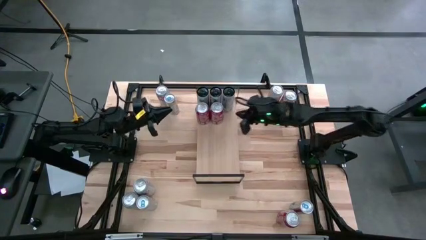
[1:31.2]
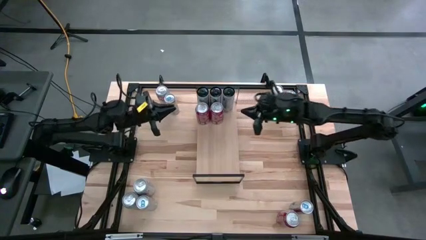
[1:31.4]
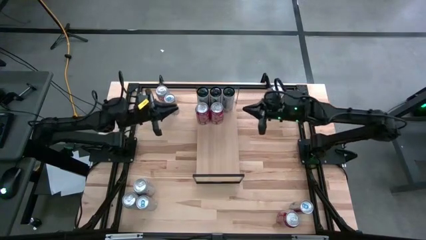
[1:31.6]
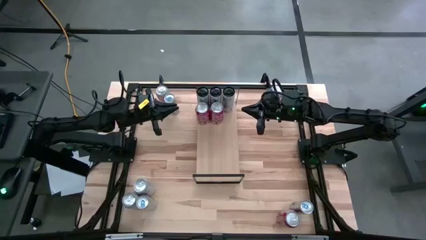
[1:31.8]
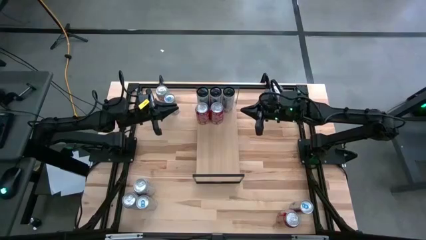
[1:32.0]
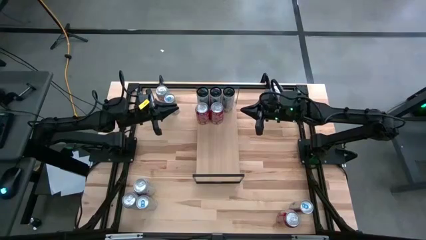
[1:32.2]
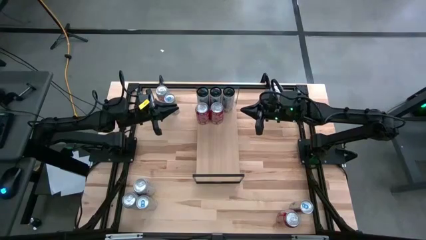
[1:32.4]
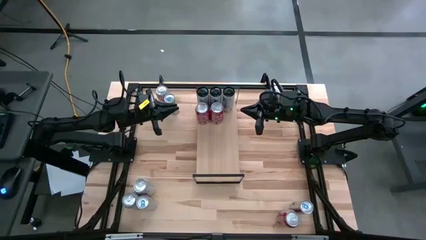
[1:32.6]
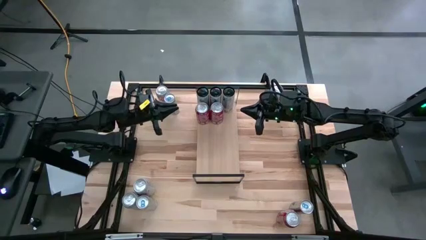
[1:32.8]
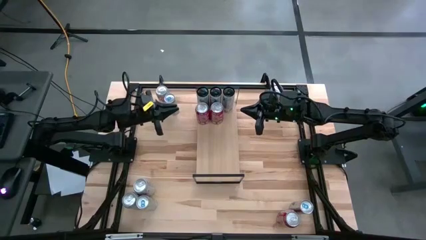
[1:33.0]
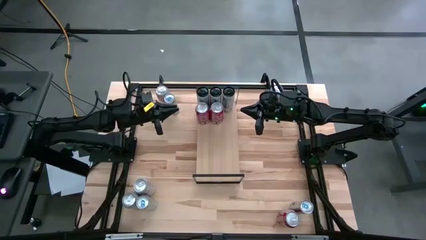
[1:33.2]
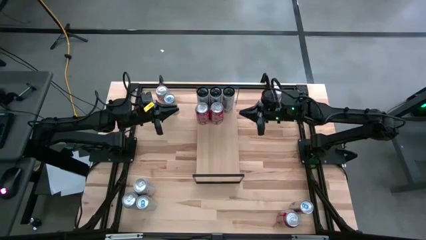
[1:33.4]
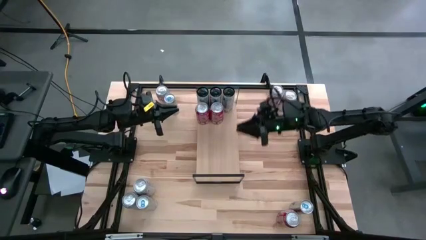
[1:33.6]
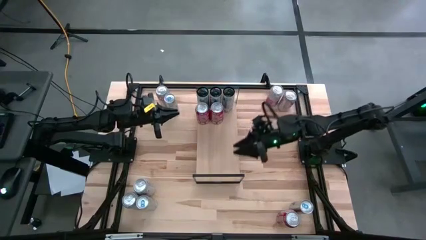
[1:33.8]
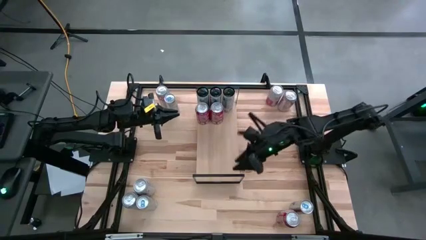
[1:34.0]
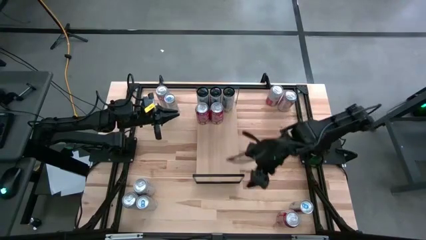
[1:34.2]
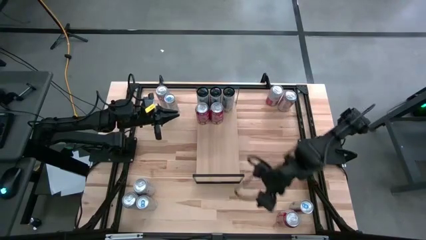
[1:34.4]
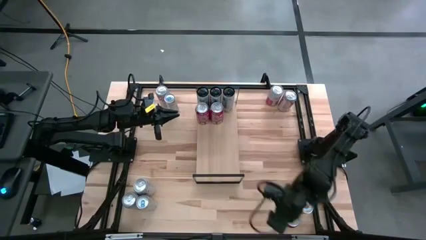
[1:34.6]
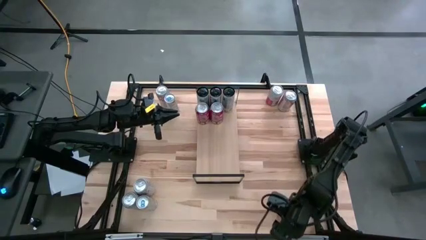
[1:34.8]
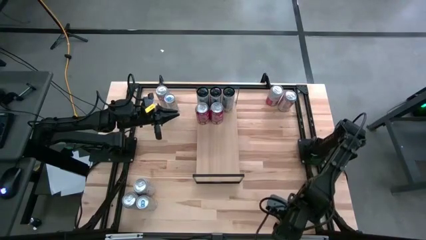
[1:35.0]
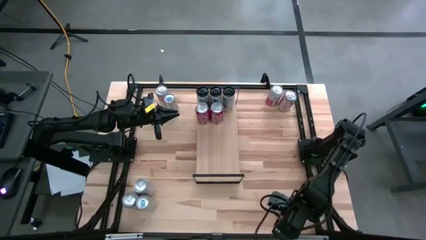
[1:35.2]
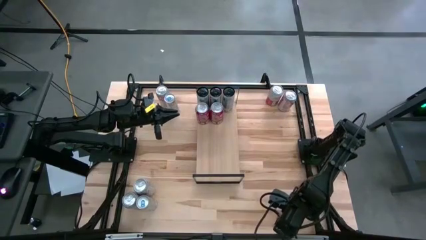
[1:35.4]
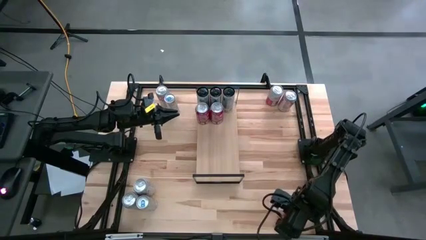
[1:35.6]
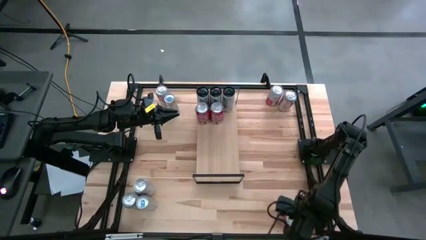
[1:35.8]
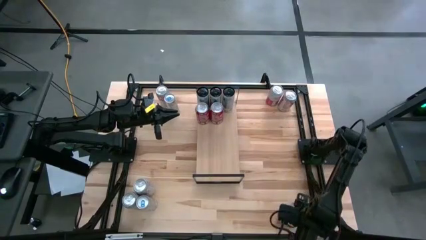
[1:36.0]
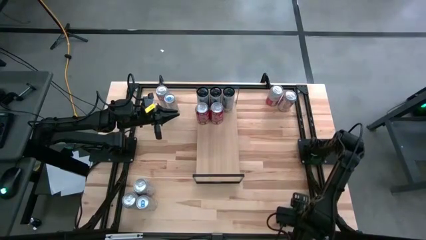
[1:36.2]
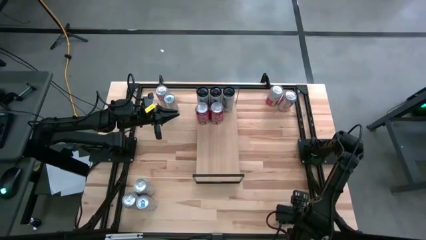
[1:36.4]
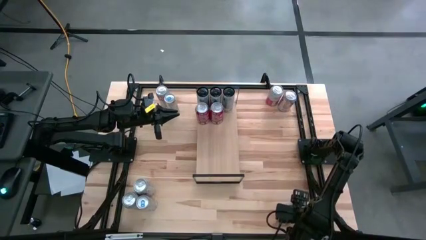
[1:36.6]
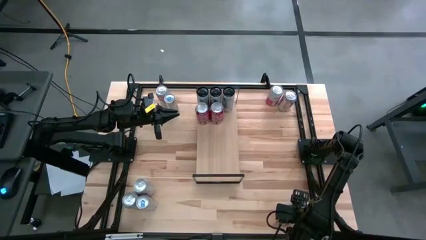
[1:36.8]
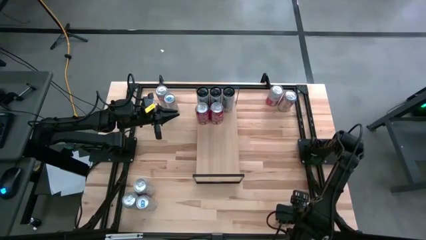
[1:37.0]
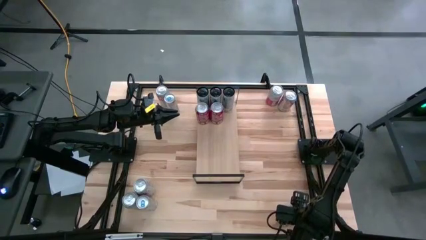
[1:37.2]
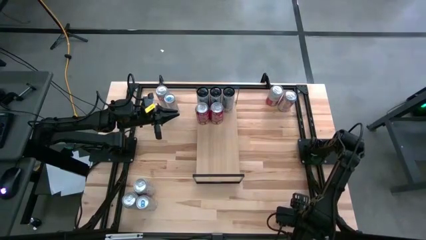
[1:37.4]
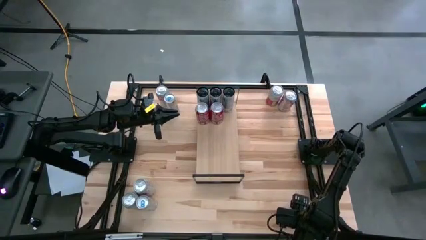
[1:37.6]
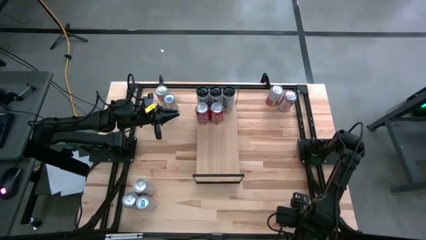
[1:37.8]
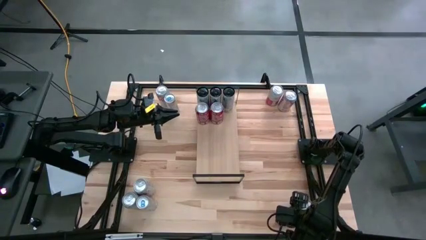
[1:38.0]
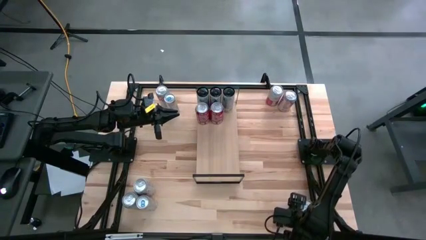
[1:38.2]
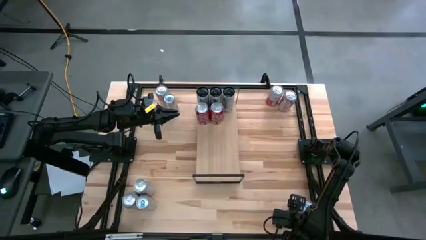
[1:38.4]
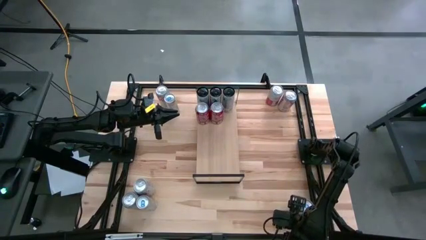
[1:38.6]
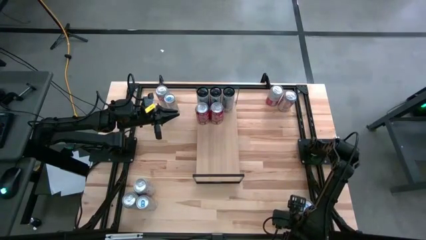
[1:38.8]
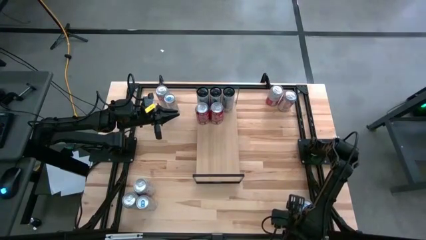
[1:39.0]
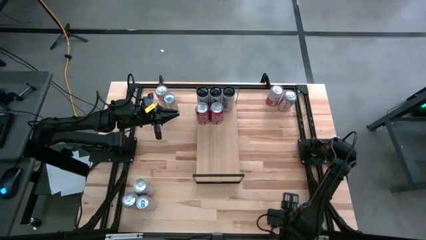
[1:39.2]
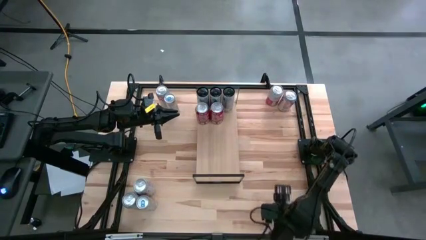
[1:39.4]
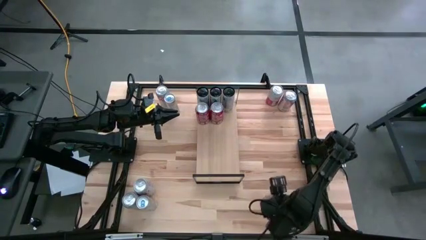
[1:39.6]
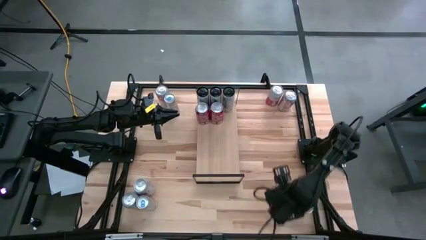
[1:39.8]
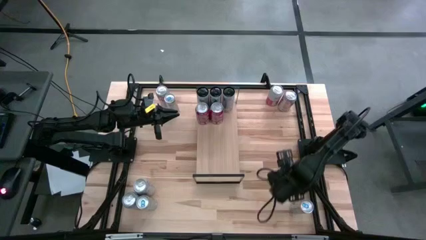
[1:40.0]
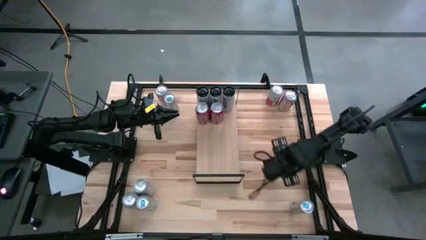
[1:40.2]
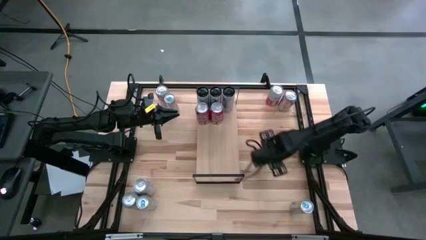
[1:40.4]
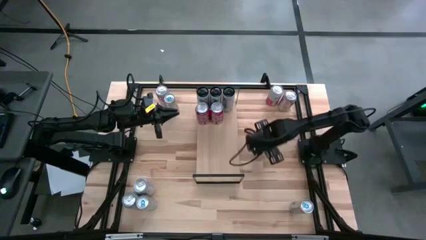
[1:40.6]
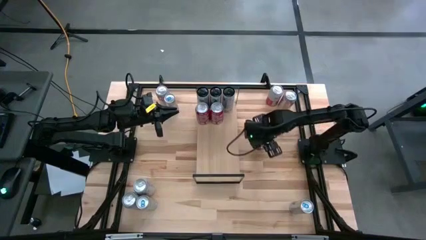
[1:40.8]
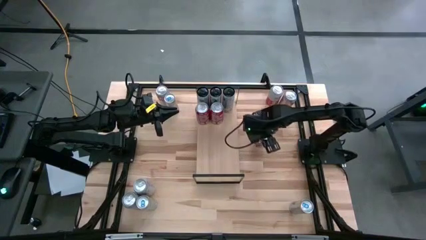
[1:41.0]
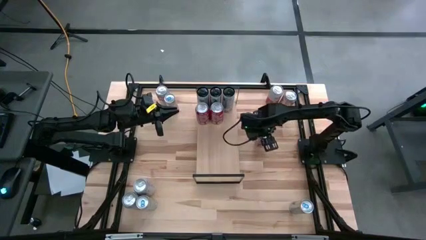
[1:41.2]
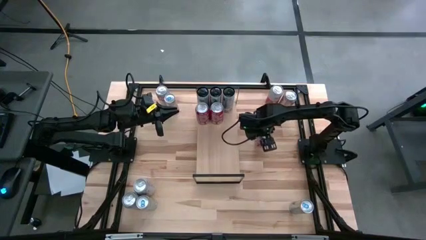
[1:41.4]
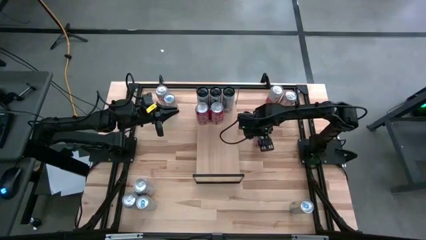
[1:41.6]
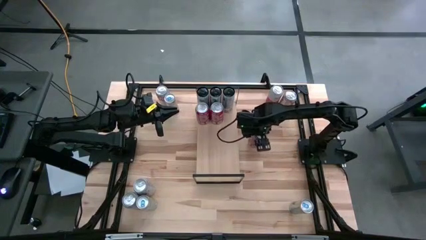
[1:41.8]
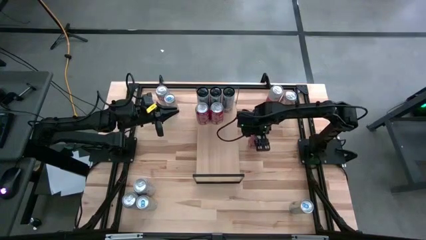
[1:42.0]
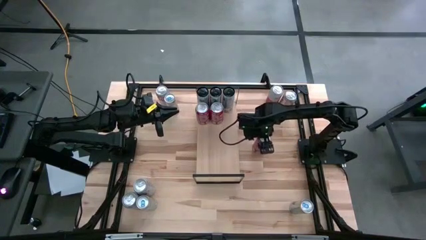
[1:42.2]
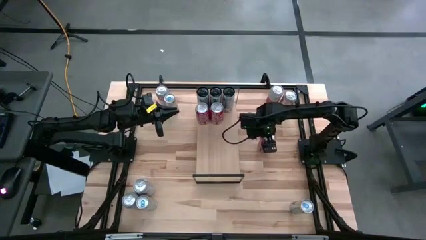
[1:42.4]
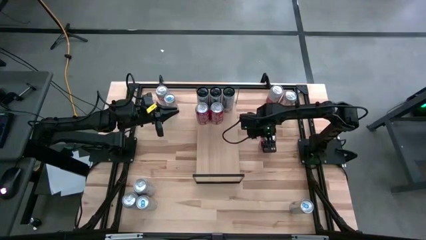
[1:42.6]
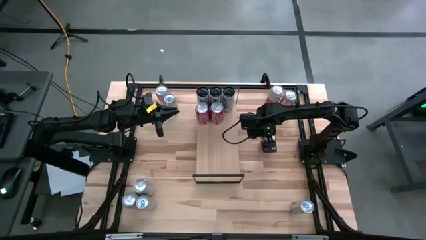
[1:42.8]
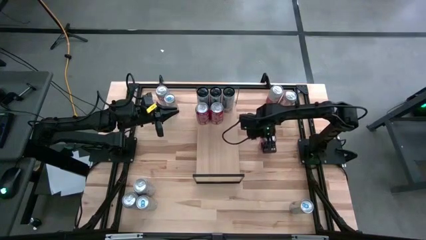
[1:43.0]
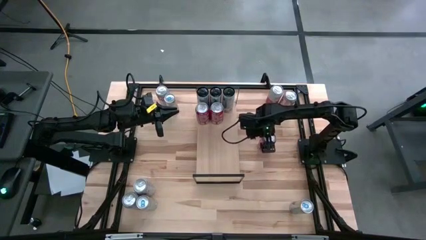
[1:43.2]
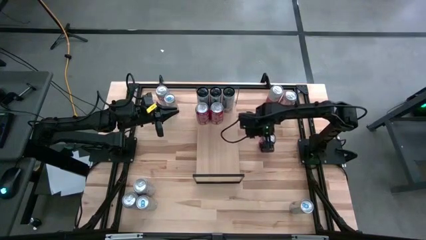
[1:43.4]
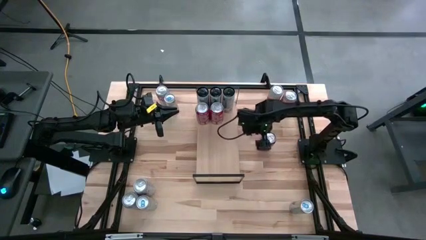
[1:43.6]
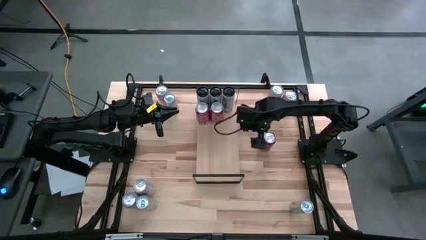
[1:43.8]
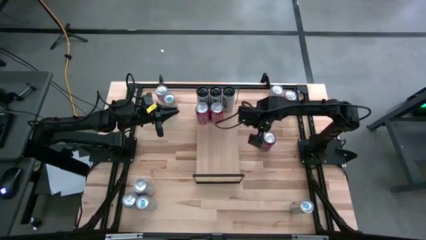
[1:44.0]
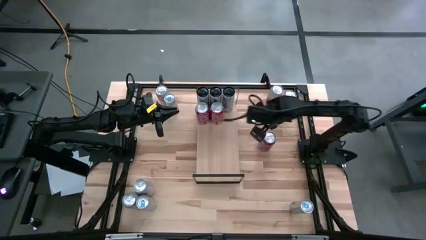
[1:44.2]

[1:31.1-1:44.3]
Task: Place canned beverage on shelf
Put the red-white soda can on the shelf aligned with the other red-white soda can

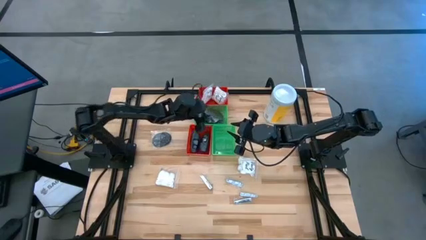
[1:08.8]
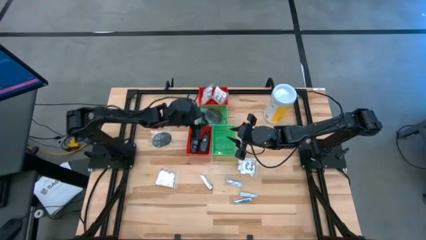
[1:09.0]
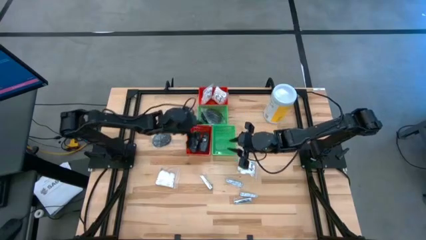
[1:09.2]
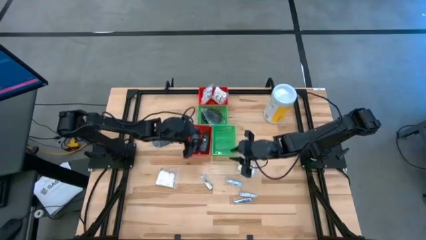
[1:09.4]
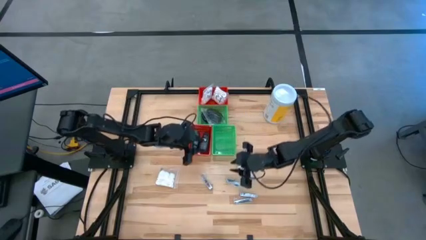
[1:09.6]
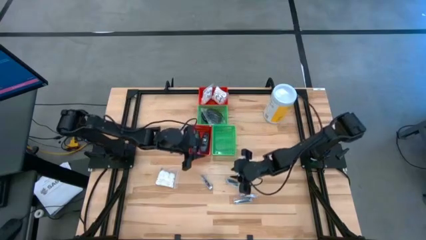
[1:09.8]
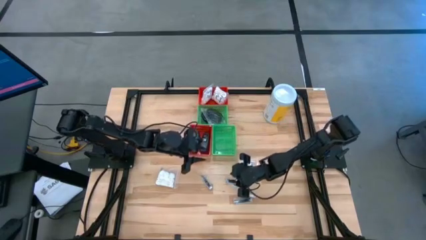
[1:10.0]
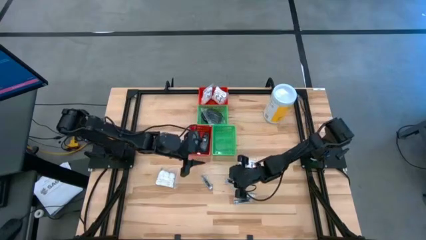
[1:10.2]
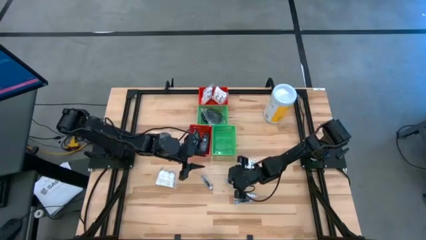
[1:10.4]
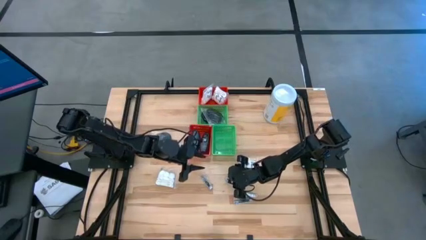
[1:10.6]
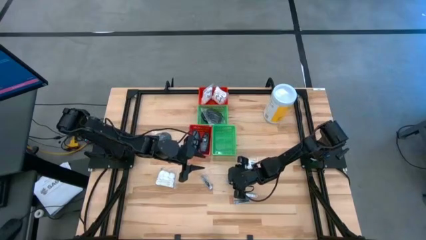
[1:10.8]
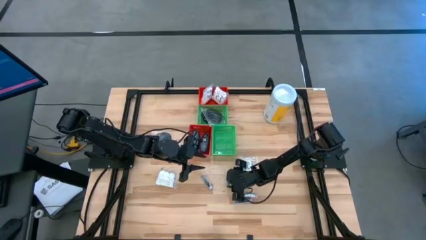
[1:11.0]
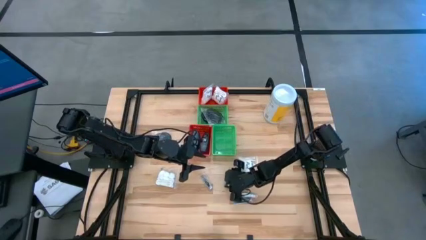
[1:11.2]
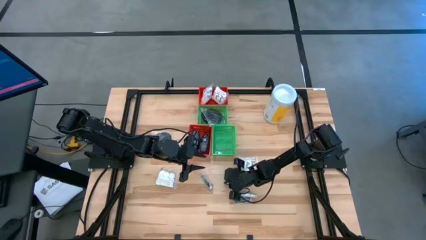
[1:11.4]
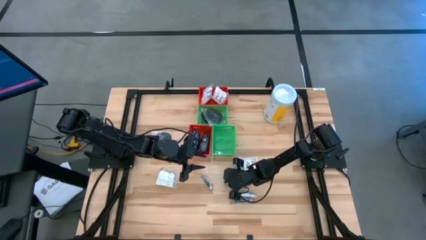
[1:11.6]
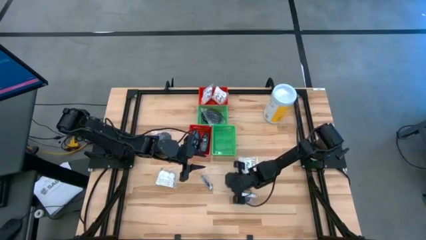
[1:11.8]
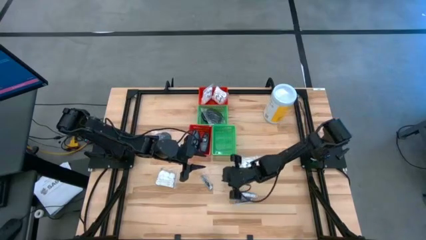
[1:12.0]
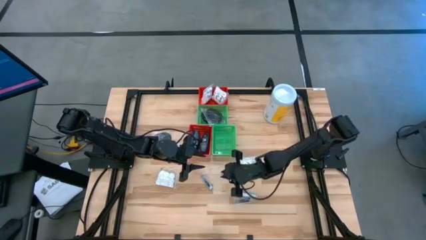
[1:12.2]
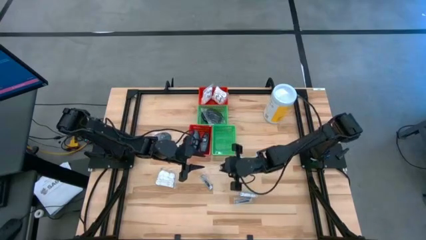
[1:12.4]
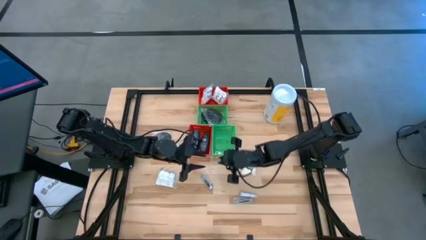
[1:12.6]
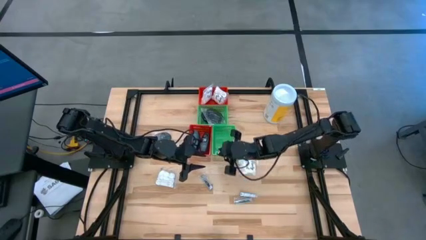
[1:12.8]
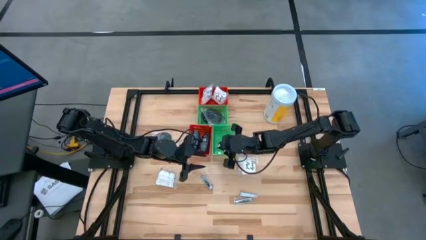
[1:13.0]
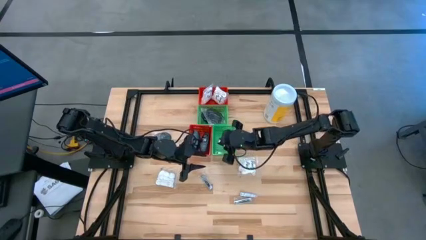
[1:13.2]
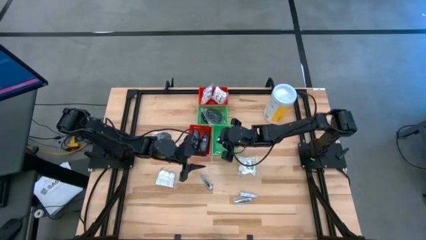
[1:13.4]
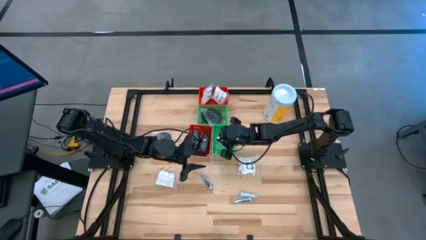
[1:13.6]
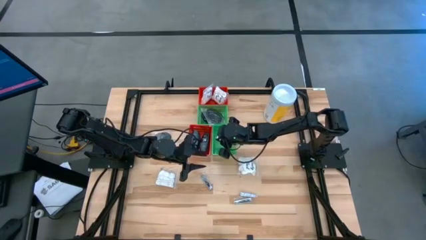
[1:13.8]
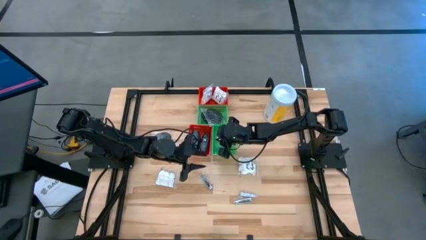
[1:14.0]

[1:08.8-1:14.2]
Task: Pick & Place Travel size toiletries
Put the silver nail cutter into the bottom green bin
